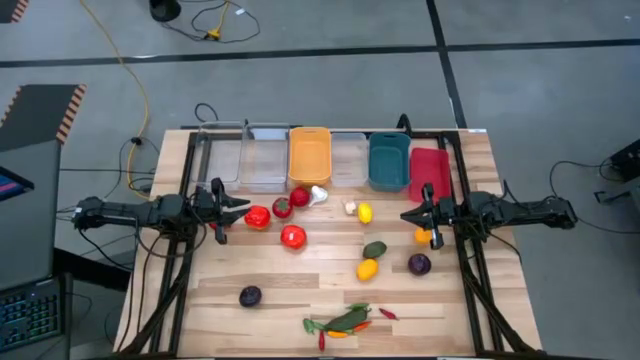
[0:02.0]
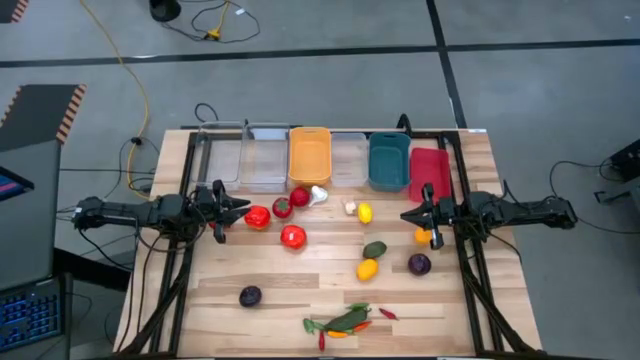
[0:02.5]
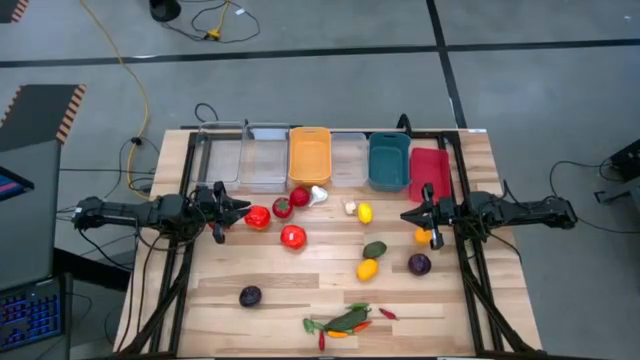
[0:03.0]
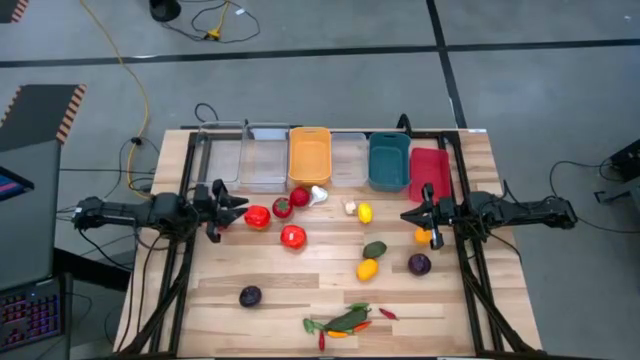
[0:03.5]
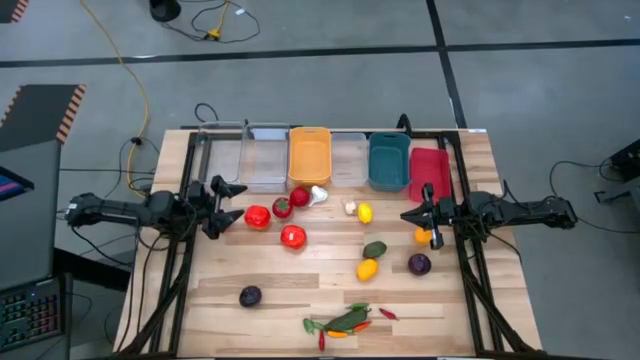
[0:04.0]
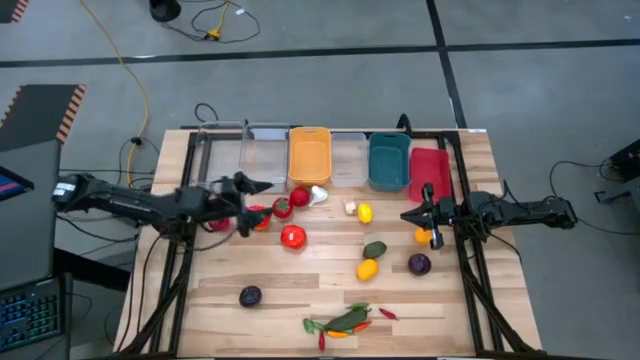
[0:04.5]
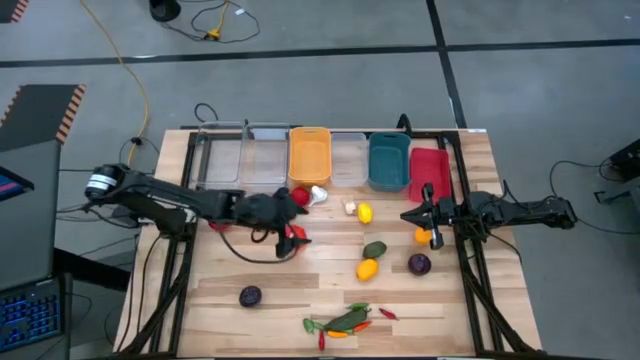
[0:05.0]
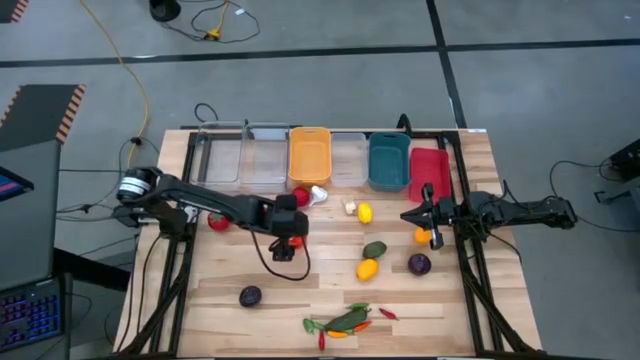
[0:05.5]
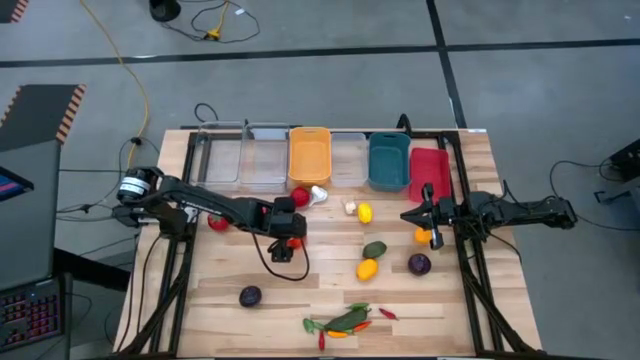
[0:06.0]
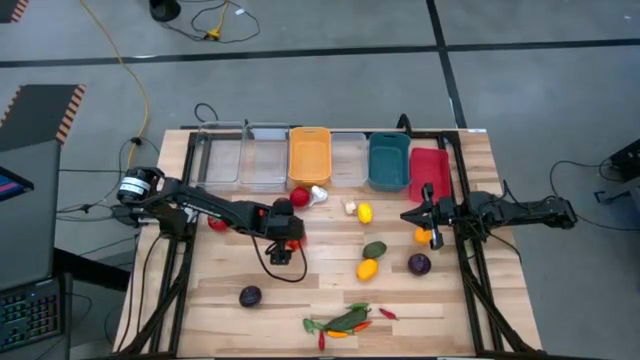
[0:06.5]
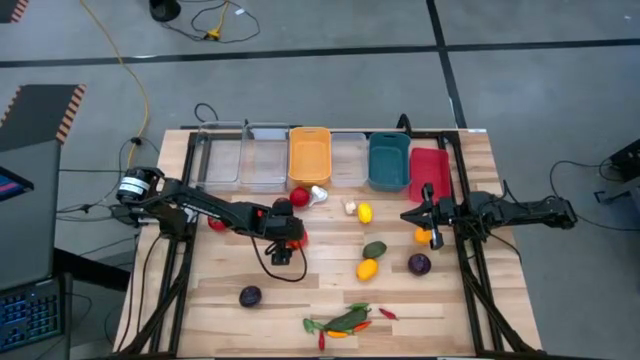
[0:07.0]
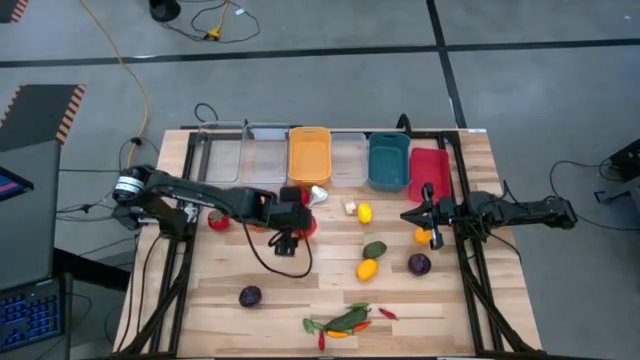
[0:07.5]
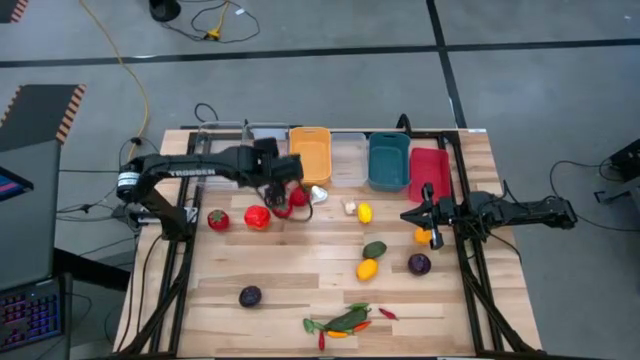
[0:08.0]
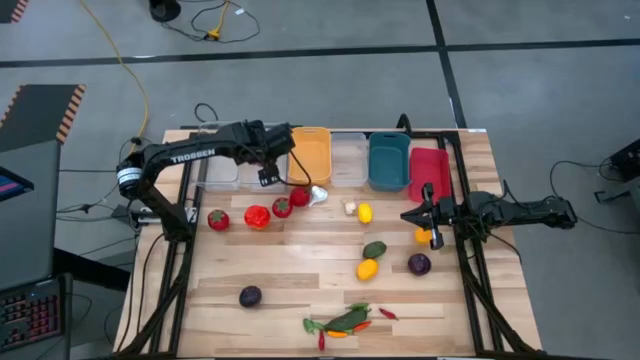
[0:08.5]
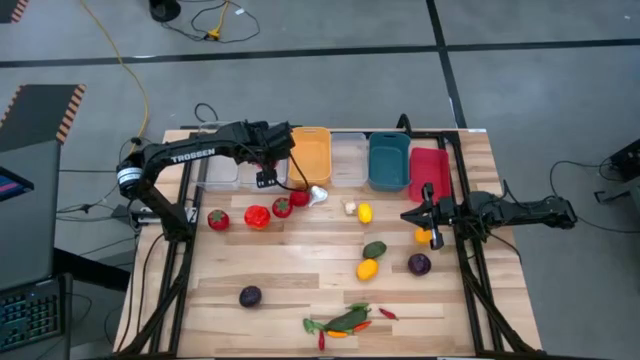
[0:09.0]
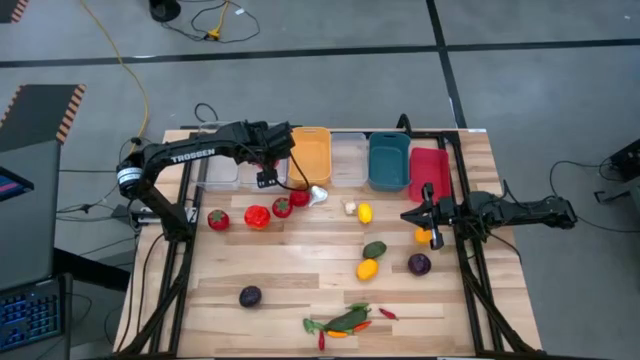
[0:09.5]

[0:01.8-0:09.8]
Task: Sort produce into baskets
Put the tomato into the right transparent bin

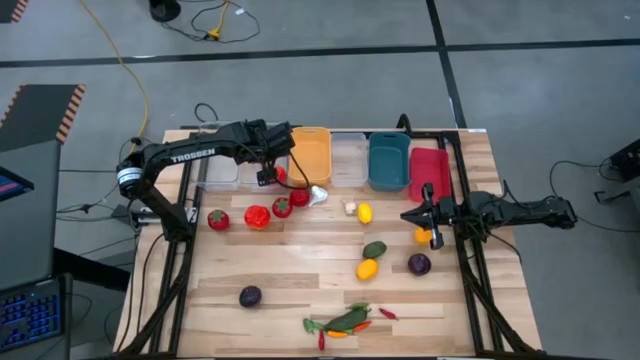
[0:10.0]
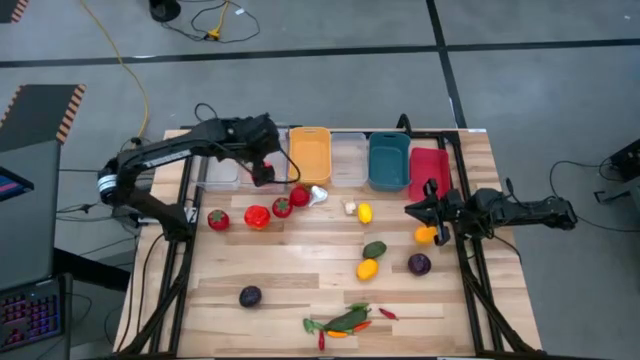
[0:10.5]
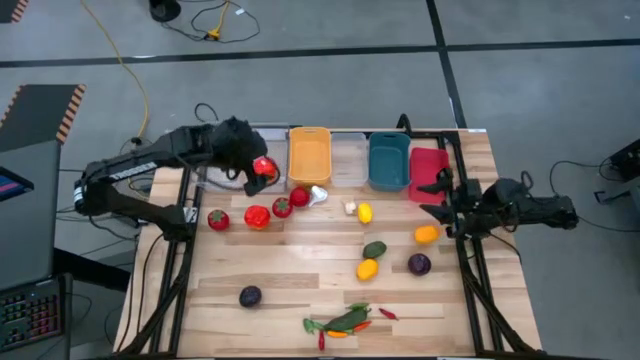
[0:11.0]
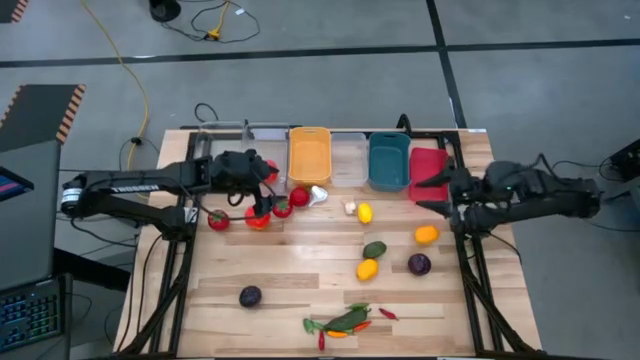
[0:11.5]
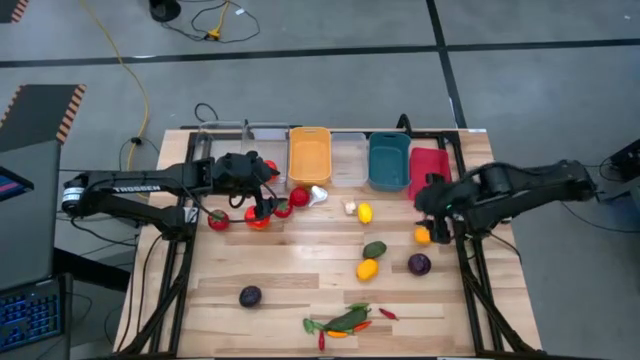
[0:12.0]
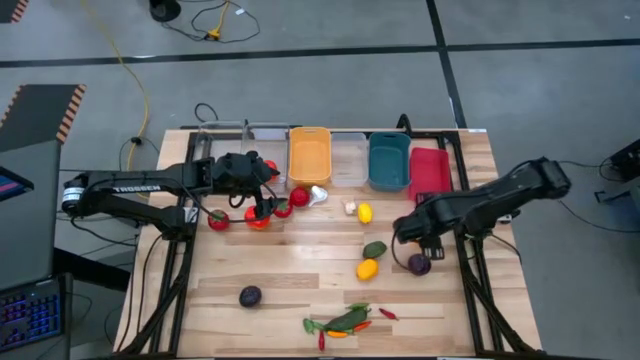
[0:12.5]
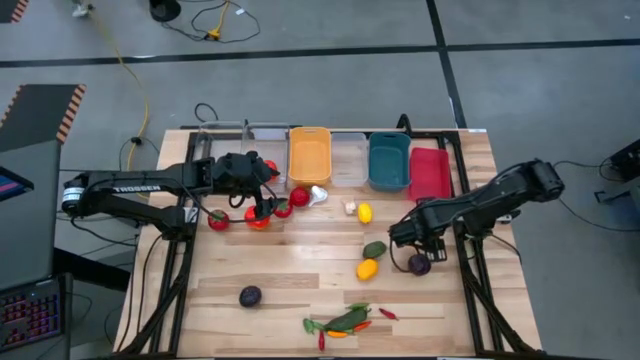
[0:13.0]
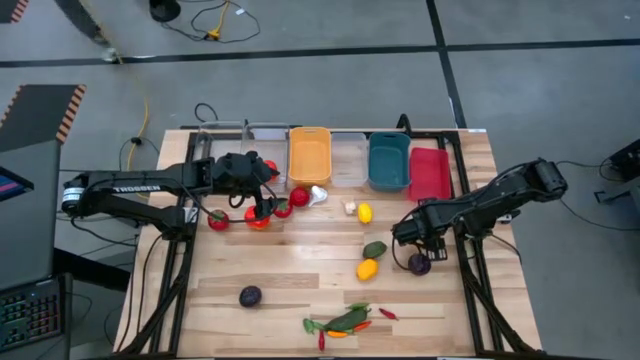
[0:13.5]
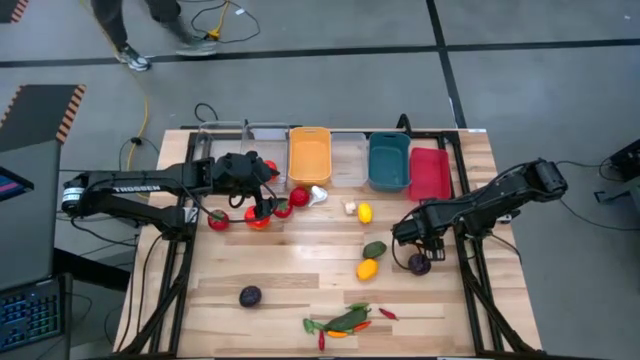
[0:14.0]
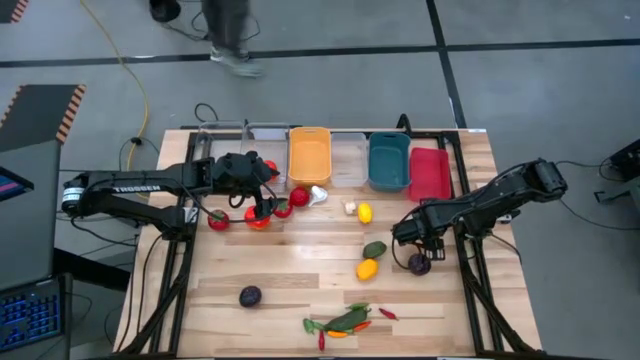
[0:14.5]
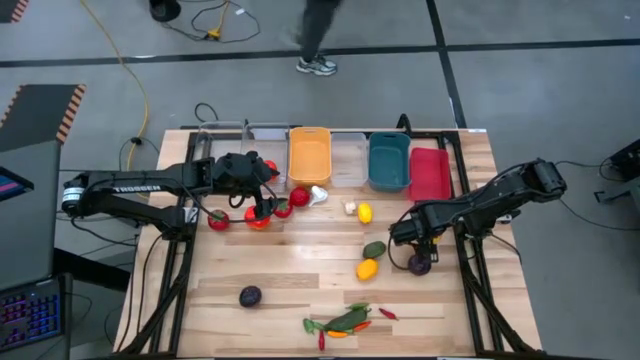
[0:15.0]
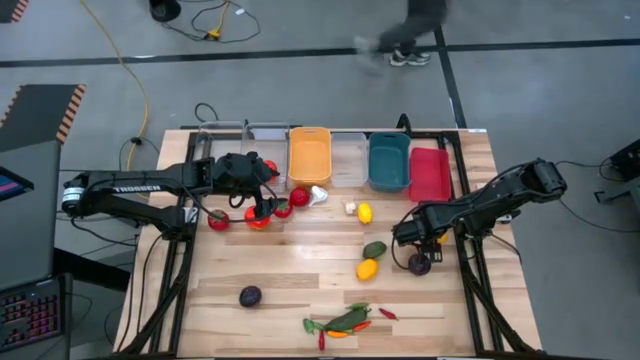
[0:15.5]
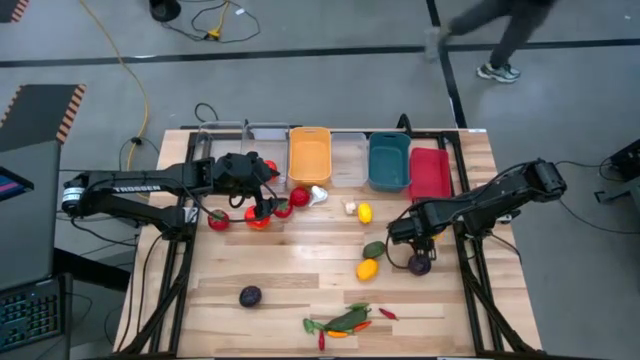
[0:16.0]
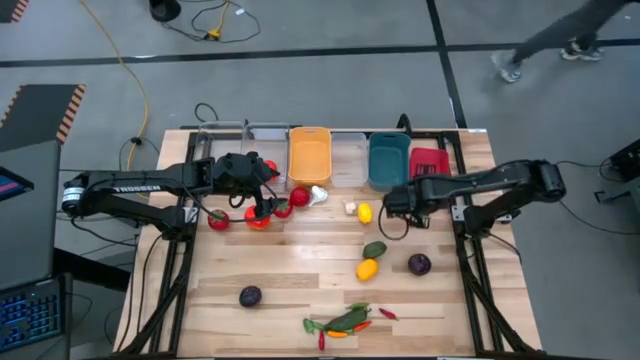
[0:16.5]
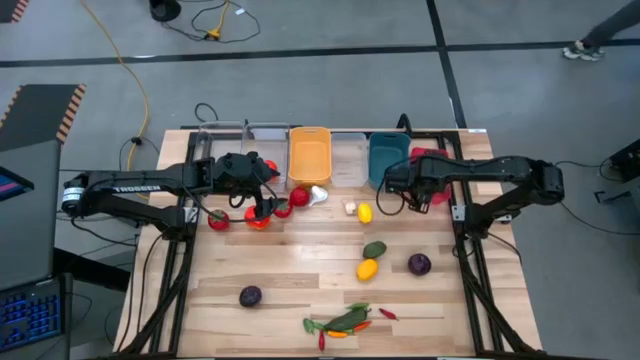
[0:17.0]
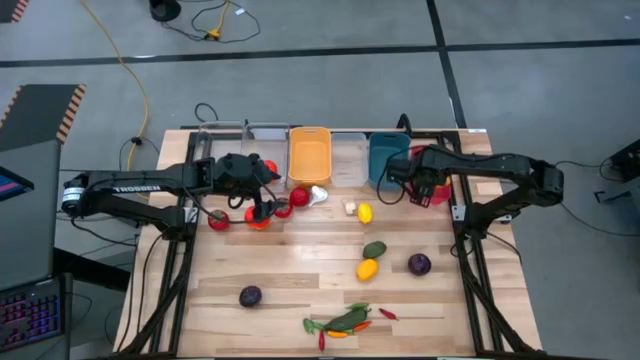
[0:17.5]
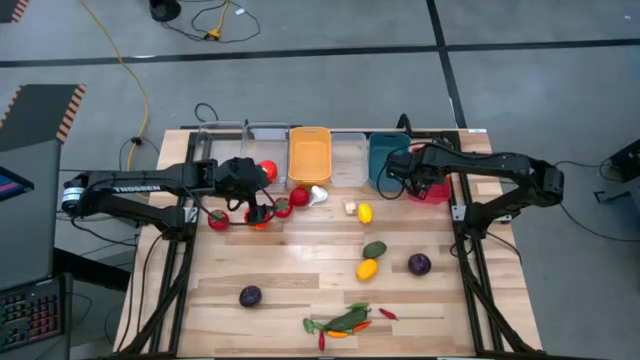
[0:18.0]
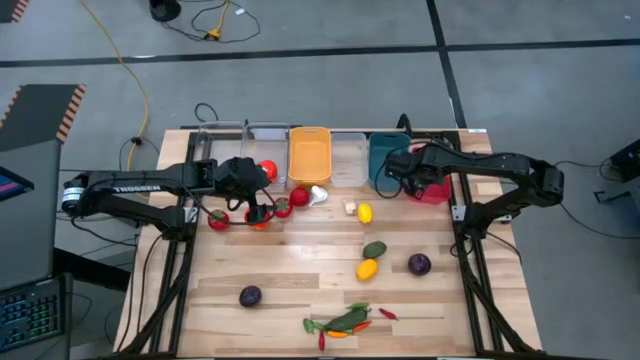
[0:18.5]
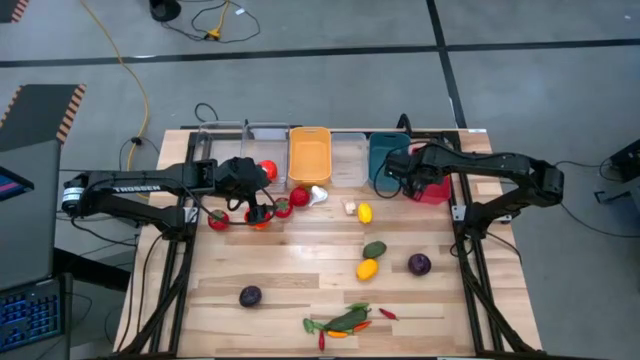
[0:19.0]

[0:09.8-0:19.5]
Put the lemon into the red bin

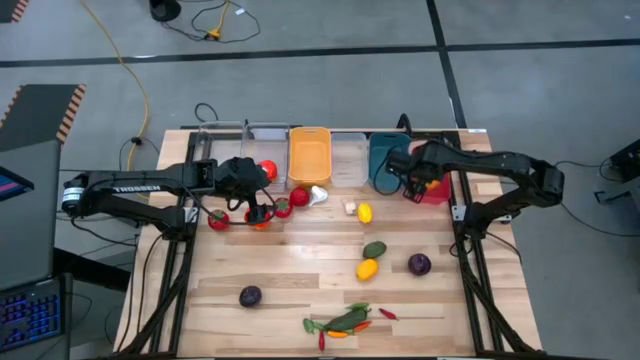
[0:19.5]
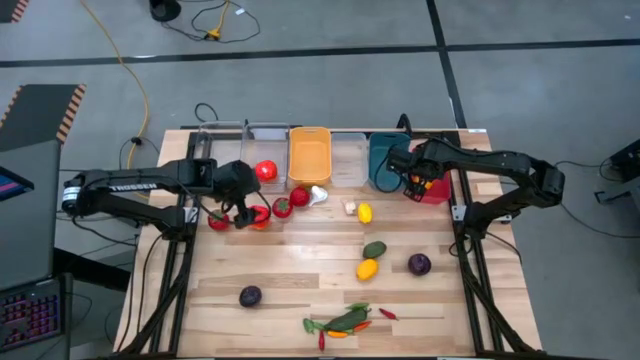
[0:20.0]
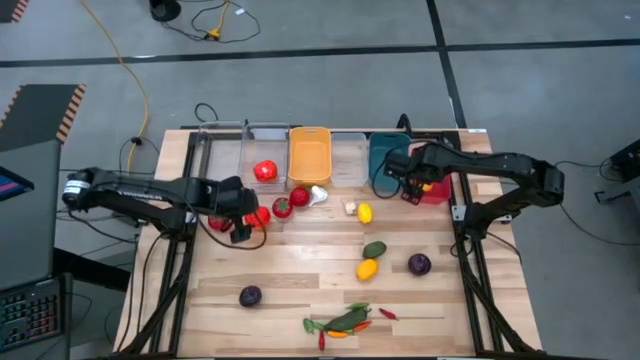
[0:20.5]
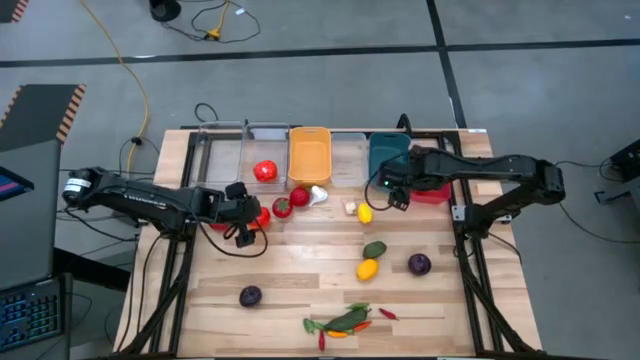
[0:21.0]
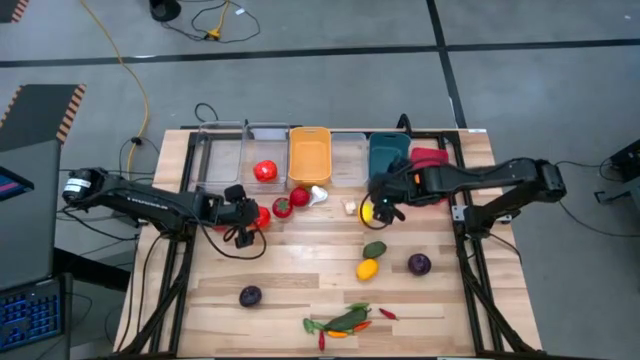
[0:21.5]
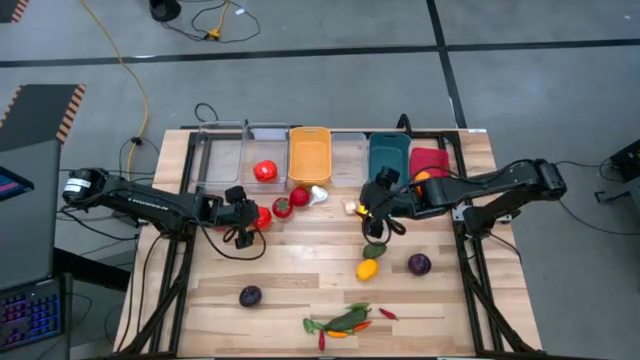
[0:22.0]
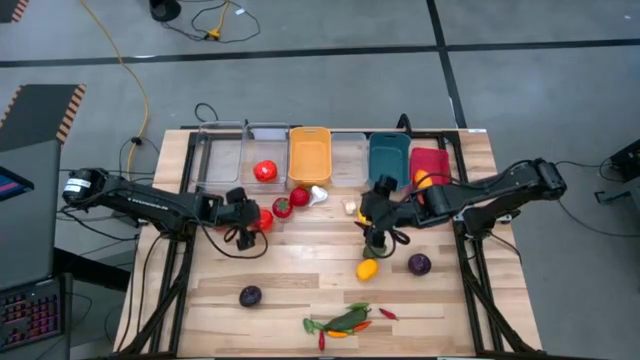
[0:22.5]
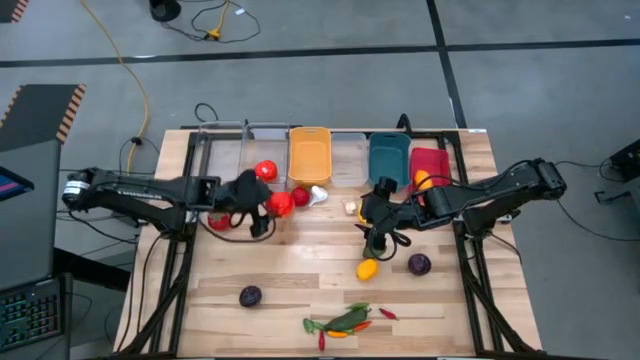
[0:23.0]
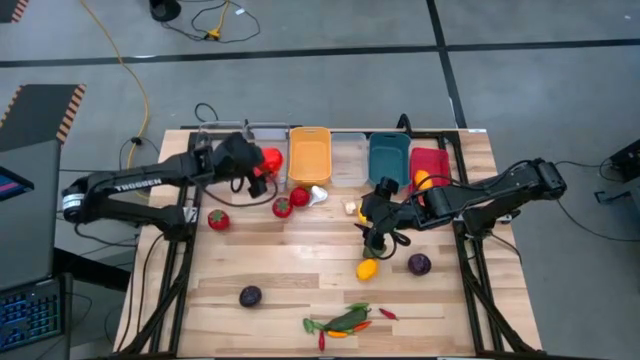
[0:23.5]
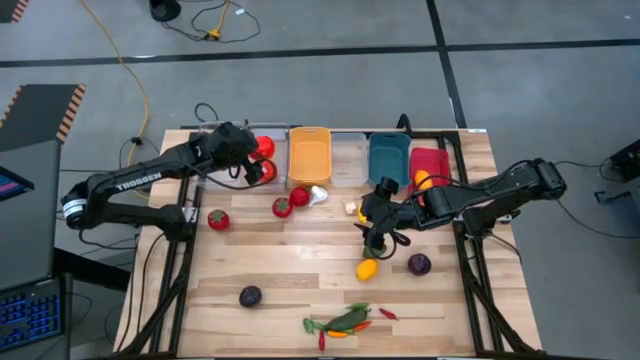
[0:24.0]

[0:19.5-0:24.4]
Put the tomato into the right transparent bin
